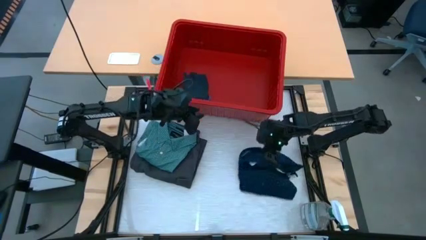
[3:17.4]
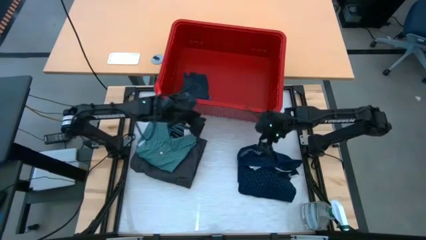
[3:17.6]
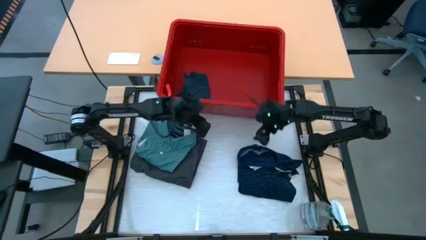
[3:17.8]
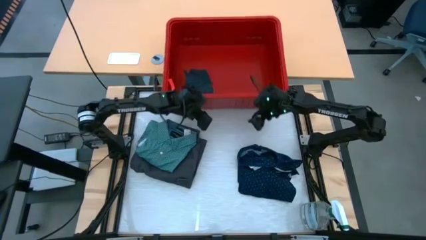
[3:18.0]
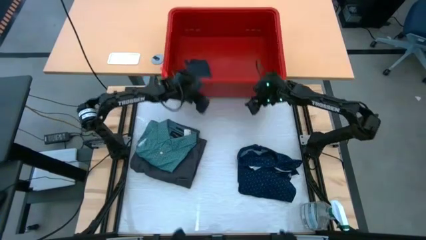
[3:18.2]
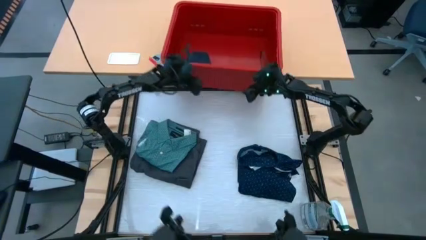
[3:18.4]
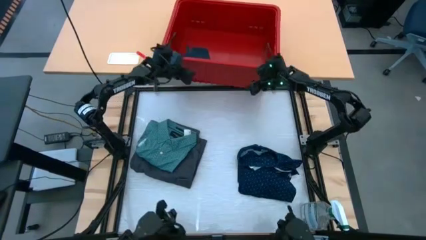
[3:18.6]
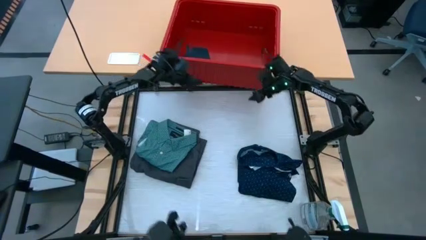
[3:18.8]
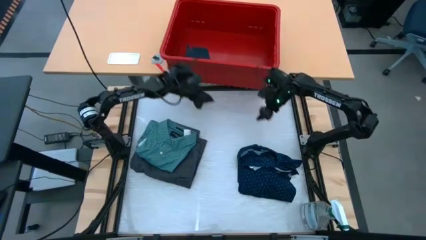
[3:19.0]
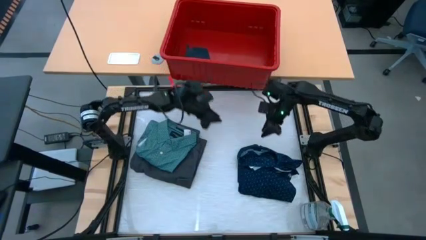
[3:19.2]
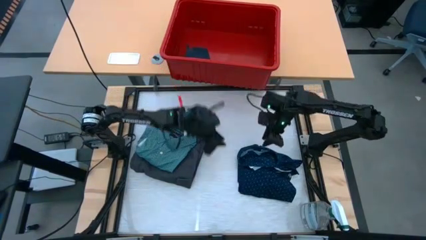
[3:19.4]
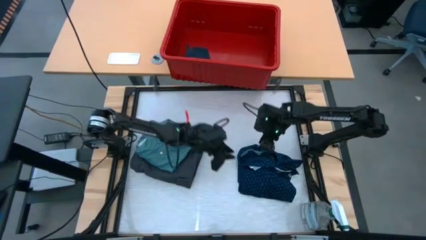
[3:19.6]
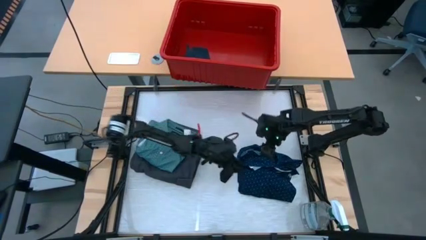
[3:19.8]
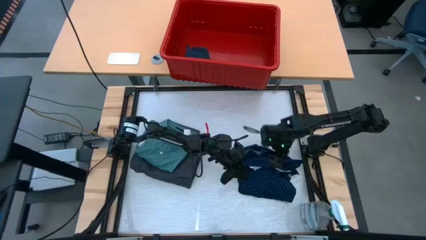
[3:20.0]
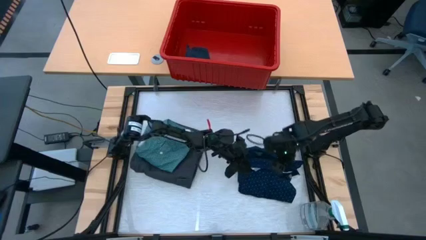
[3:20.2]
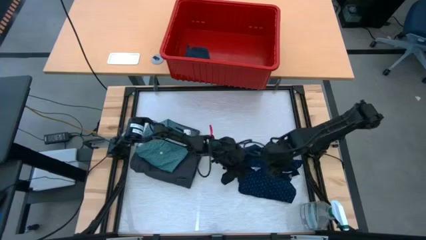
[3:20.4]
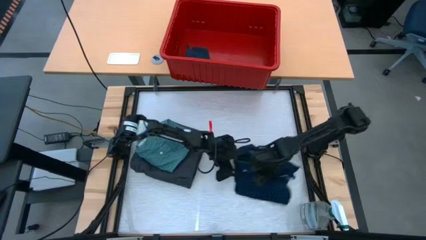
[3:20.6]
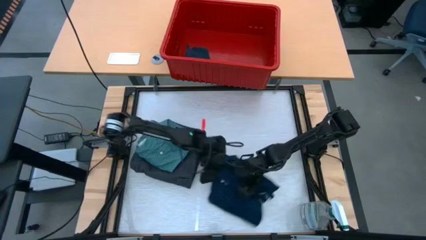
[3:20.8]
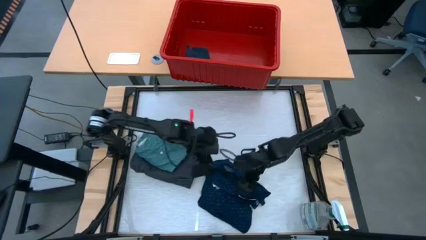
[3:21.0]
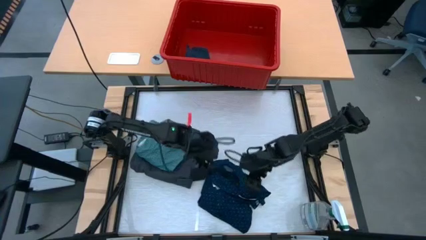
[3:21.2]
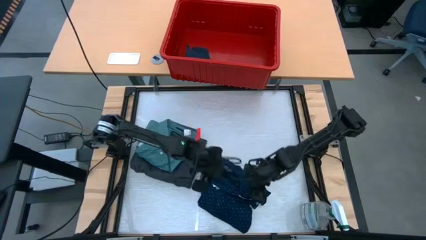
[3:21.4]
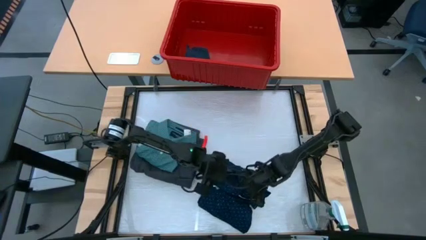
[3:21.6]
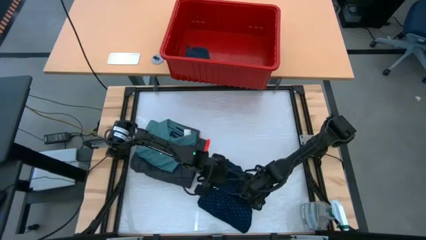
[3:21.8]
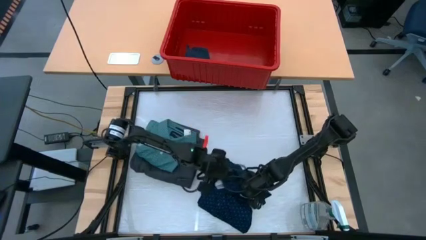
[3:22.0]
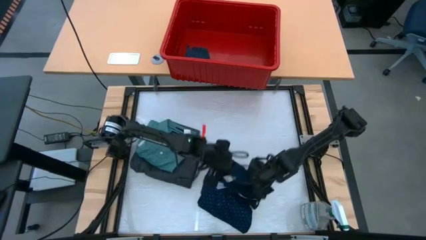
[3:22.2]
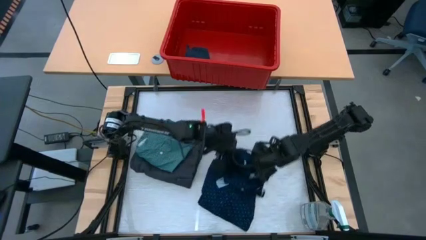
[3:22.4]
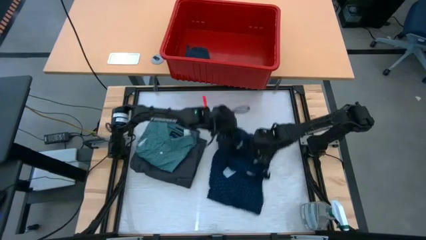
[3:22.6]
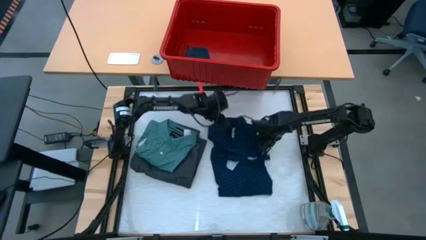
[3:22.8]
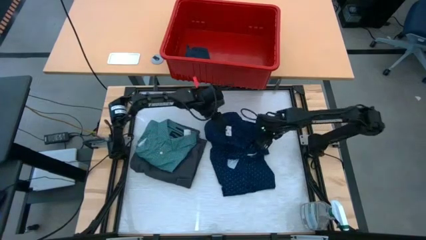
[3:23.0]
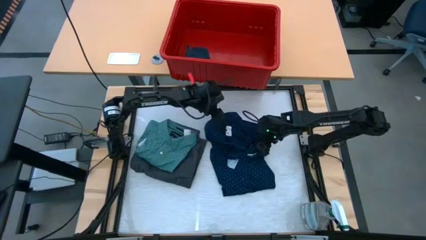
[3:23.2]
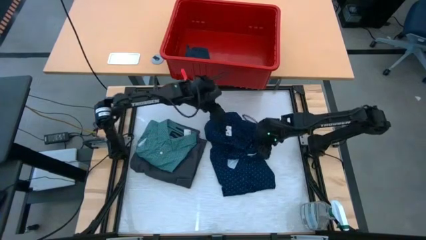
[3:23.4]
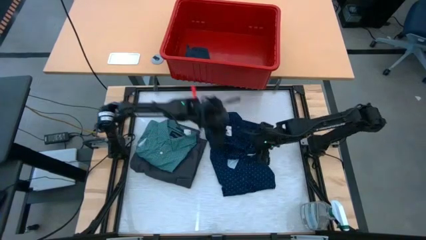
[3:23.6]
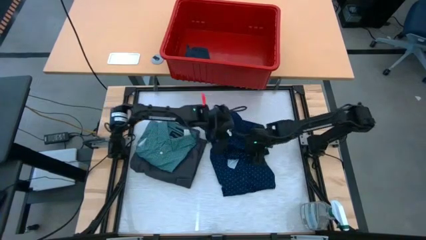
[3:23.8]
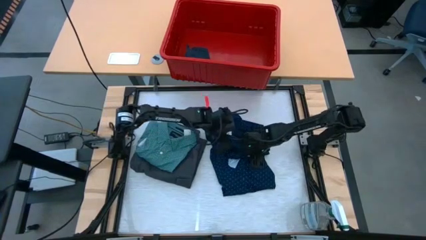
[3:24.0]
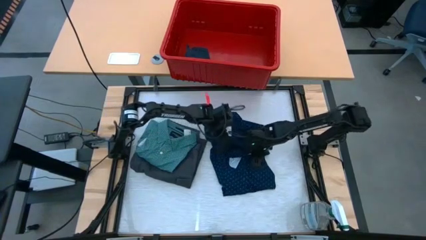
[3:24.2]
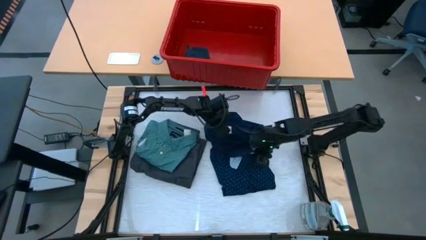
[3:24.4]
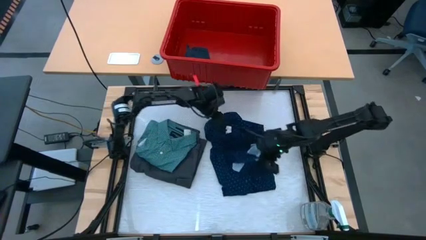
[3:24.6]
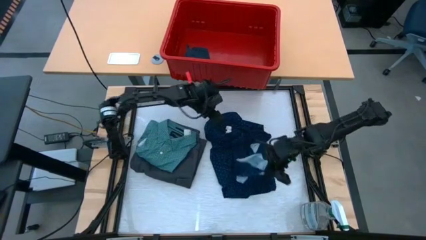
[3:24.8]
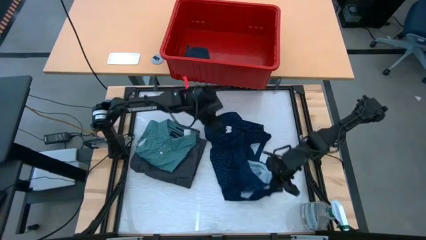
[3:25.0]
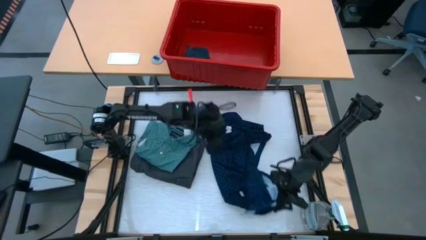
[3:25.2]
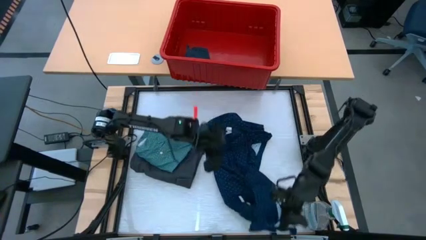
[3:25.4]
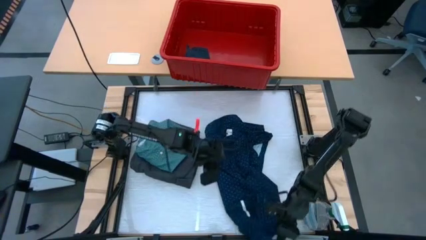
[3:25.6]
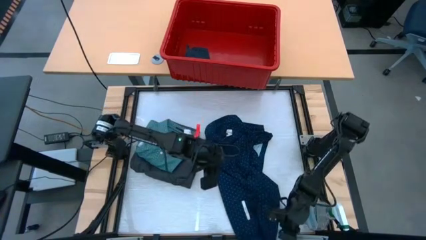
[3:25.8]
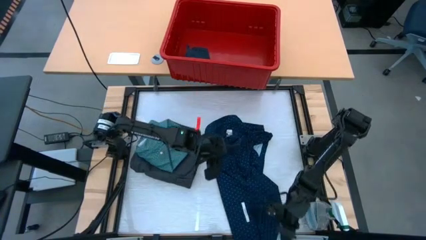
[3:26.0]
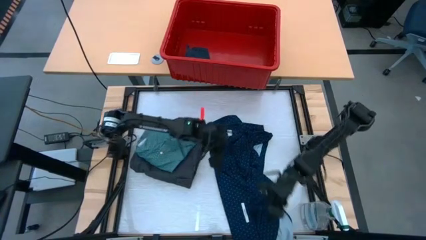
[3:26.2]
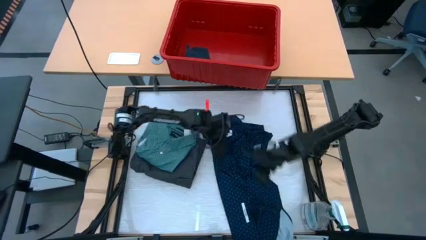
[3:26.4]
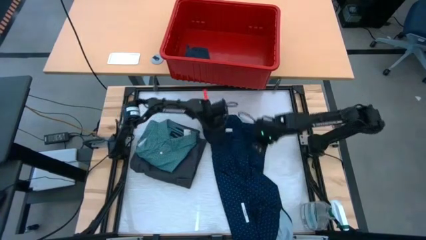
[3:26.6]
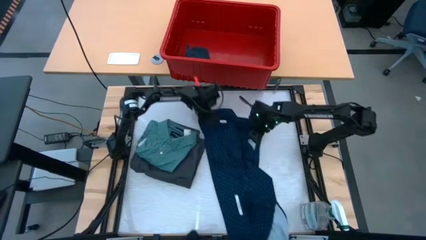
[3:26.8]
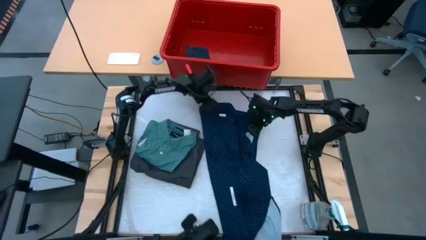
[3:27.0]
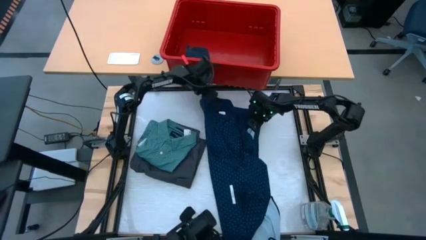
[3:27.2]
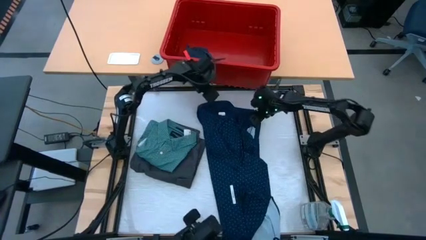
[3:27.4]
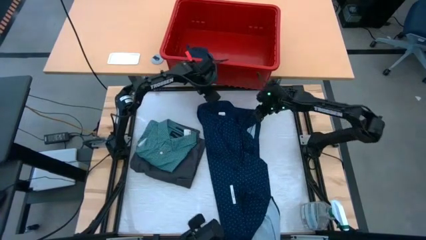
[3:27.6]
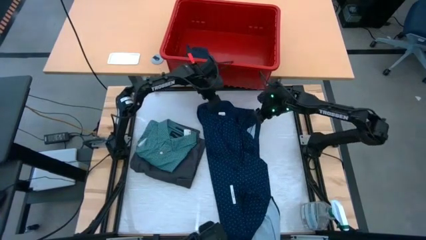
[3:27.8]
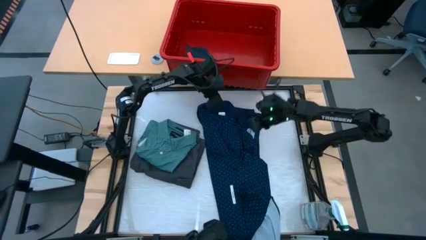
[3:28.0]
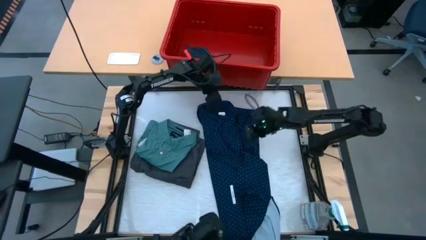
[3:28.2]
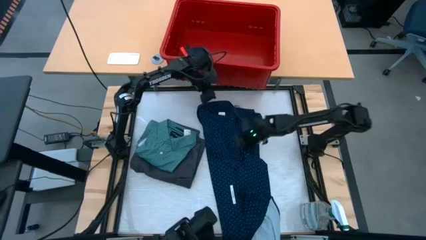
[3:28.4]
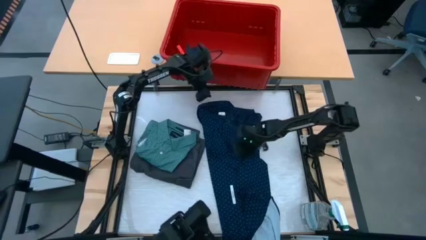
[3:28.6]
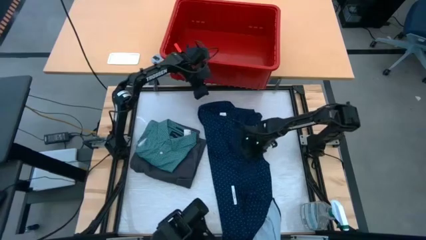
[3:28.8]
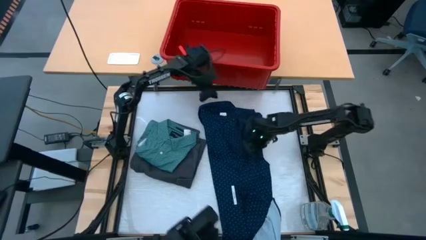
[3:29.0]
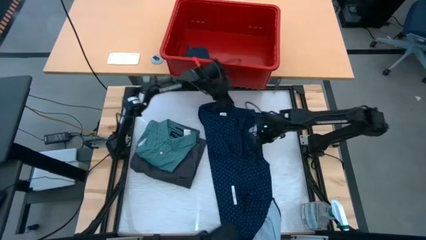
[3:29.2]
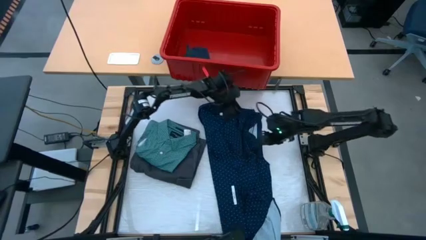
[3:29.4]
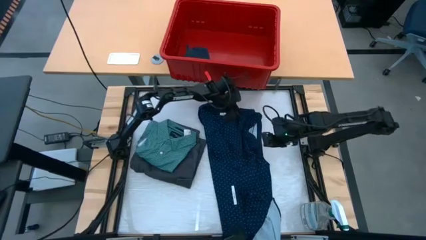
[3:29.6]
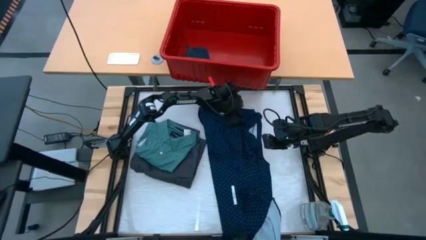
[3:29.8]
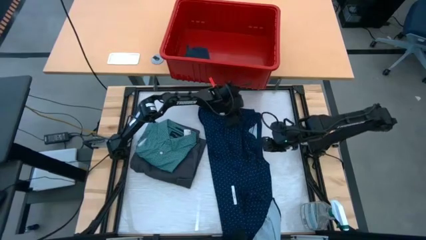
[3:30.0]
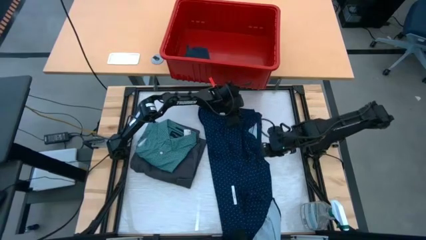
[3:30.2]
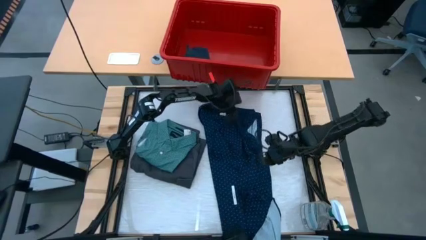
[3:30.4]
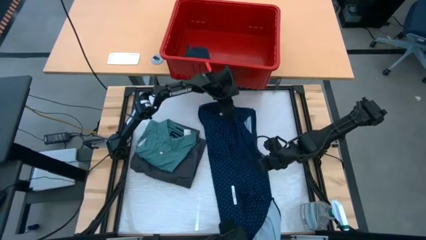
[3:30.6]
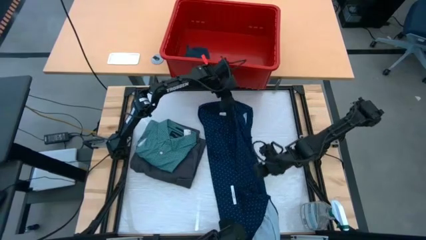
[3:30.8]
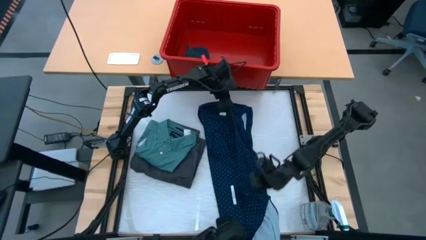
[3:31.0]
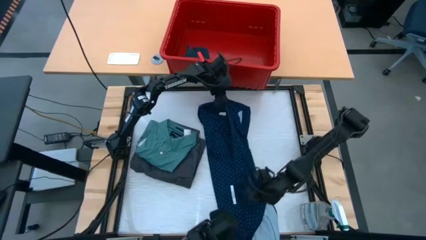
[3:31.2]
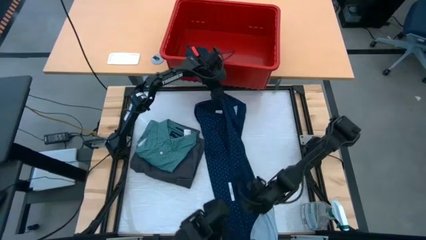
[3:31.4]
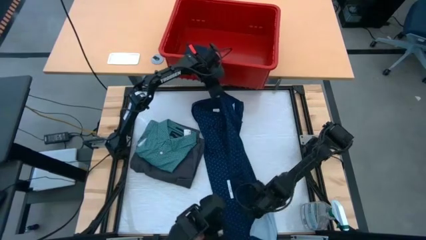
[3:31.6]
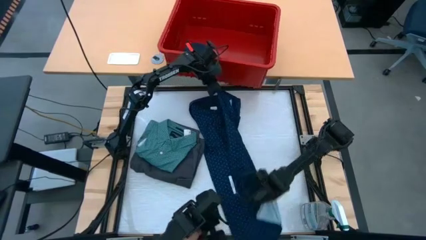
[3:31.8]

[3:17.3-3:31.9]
Task: Fold laundry
Fold the dark blue polo

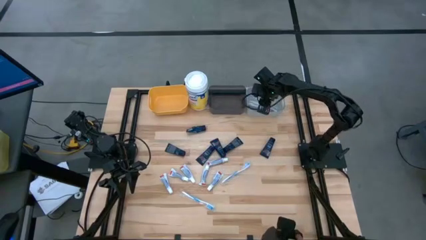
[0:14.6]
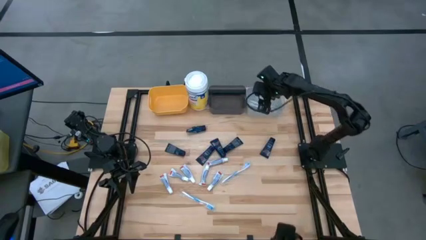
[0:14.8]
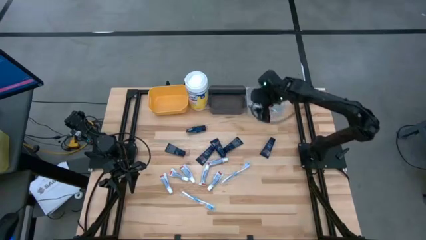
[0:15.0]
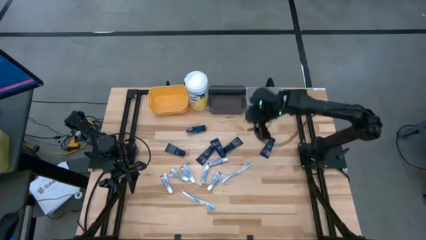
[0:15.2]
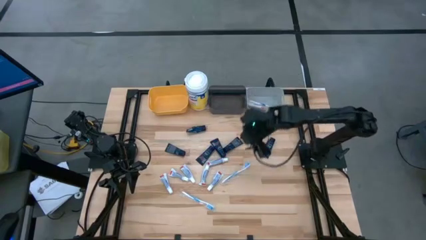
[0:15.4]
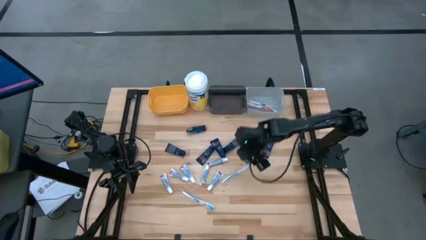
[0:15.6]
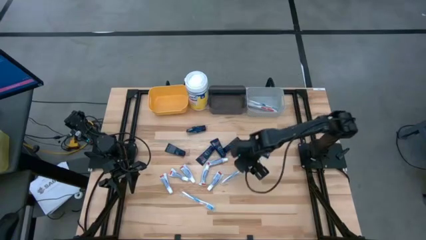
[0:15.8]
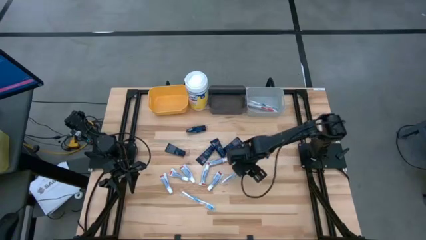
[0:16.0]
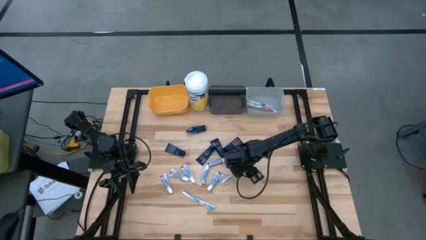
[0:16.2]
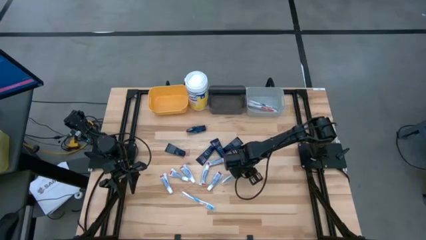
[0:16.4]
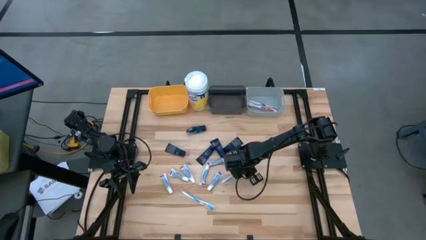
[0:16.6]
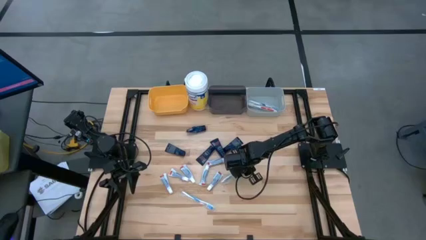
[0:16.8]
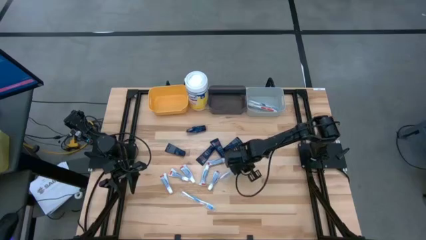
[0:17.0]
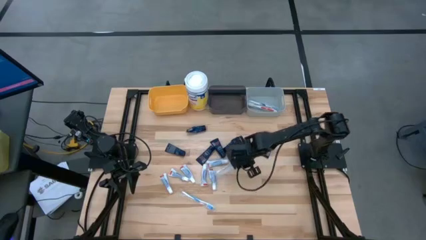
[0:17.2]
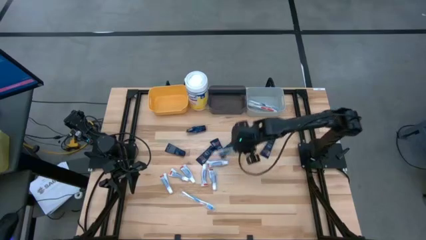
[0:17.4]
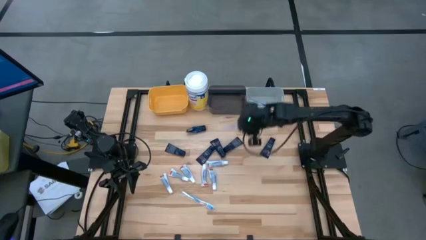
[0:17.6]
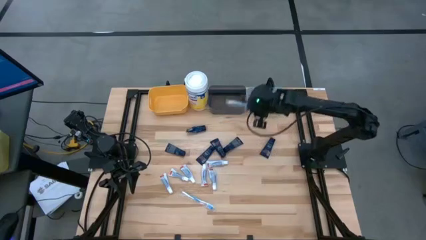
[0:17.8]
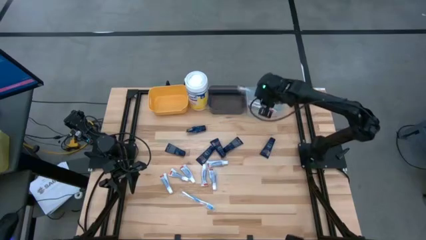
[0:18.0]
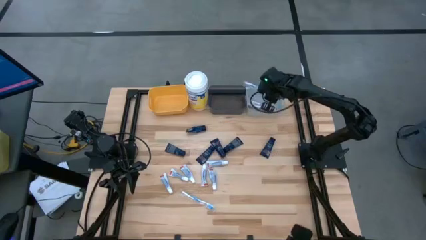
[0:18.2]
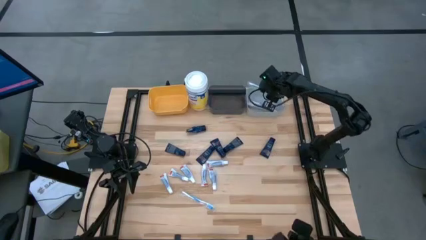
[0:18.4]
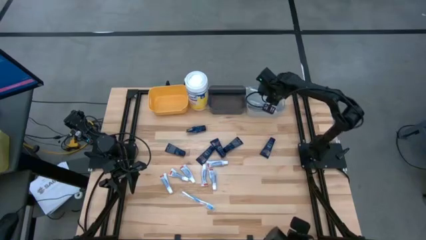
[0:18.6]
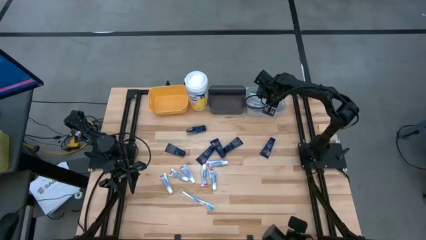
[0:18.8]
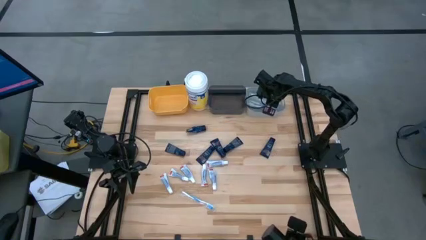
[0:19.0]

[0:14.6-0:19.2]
Task: Pick & Place Travel size toiletries
Put the light blue toothbrush into the gray bin
